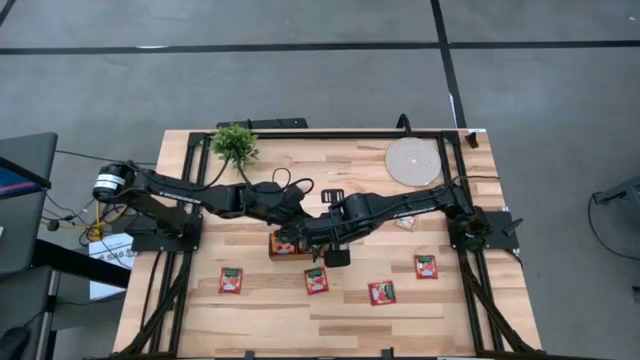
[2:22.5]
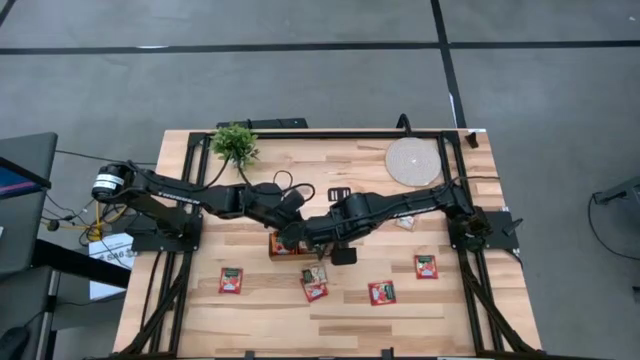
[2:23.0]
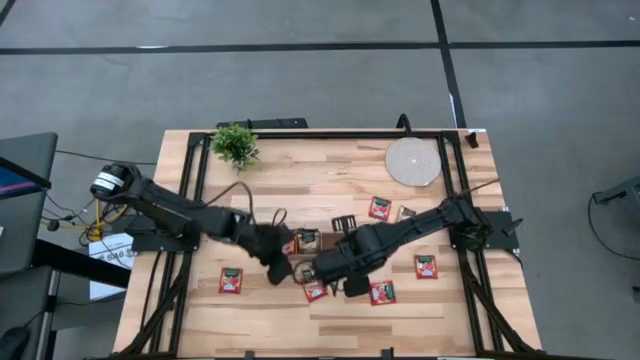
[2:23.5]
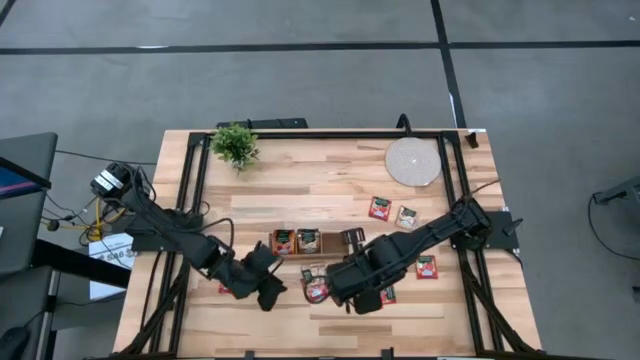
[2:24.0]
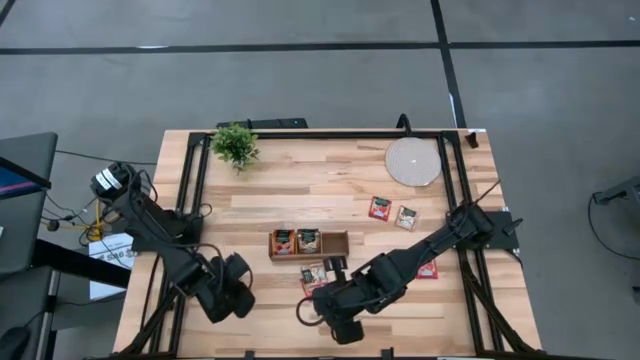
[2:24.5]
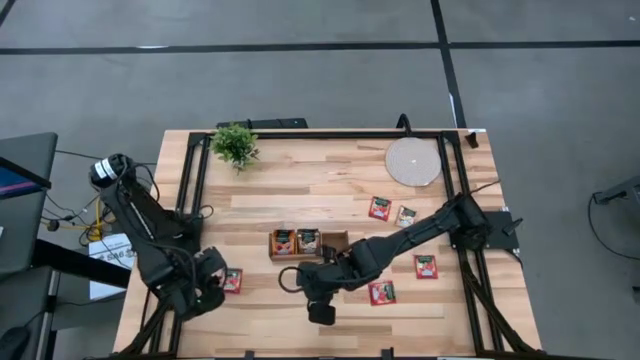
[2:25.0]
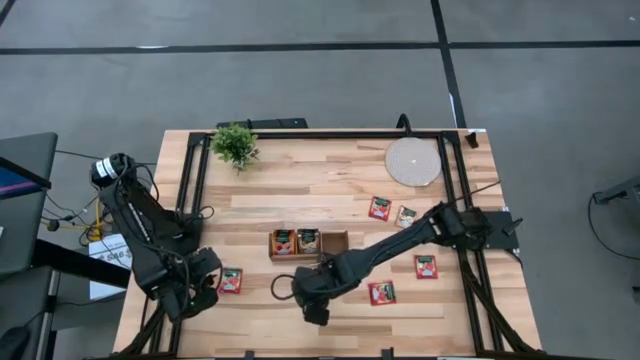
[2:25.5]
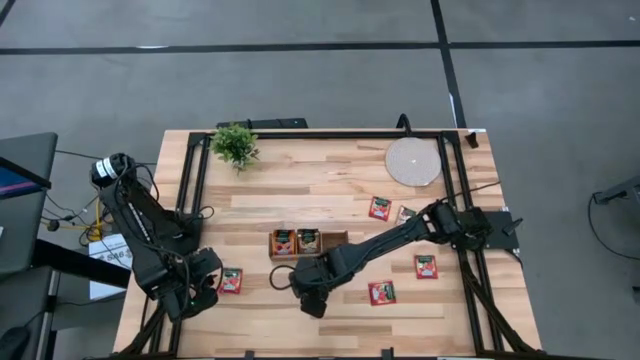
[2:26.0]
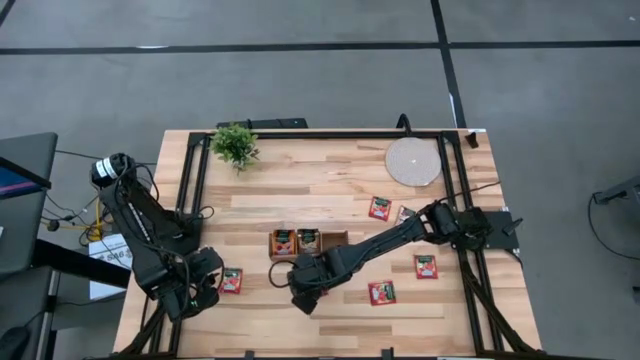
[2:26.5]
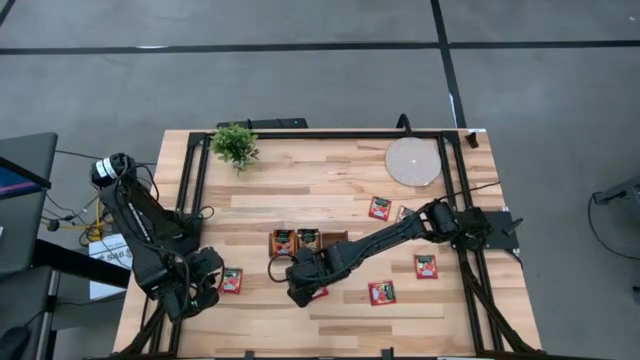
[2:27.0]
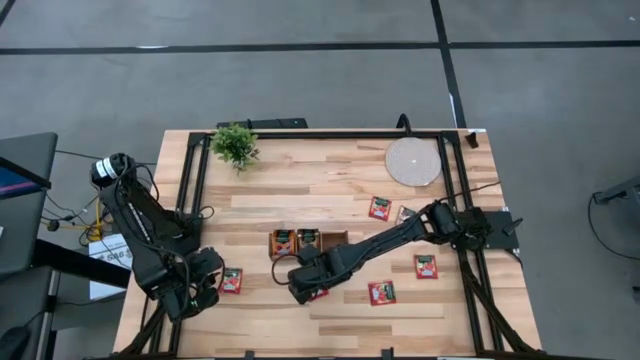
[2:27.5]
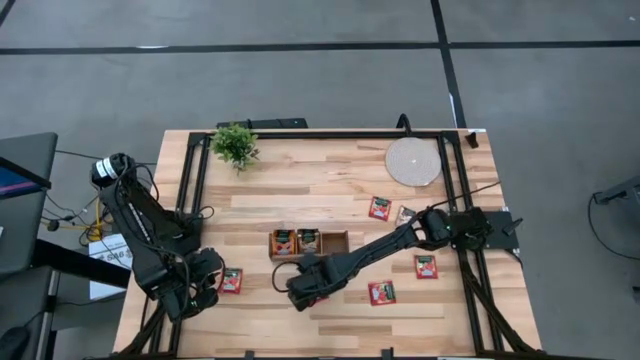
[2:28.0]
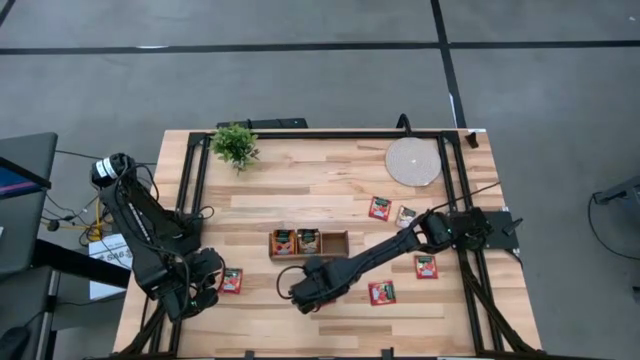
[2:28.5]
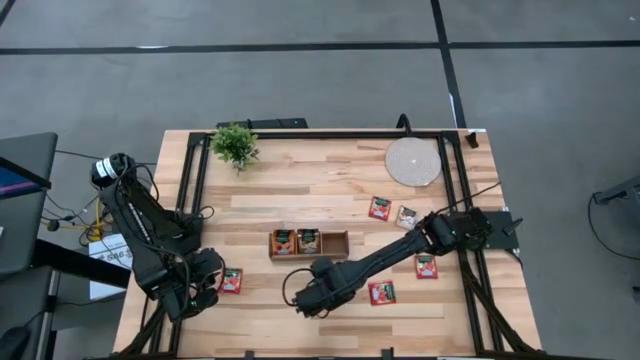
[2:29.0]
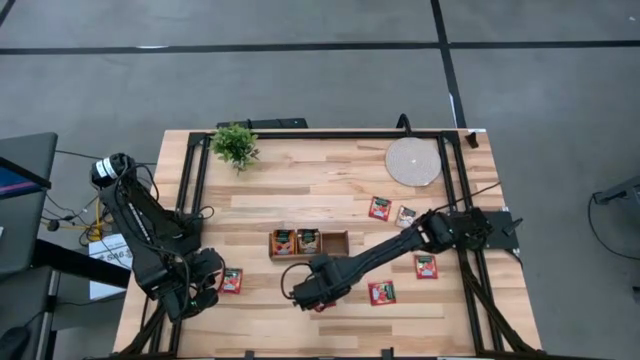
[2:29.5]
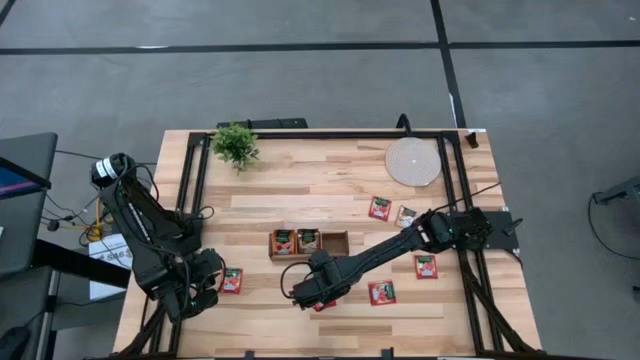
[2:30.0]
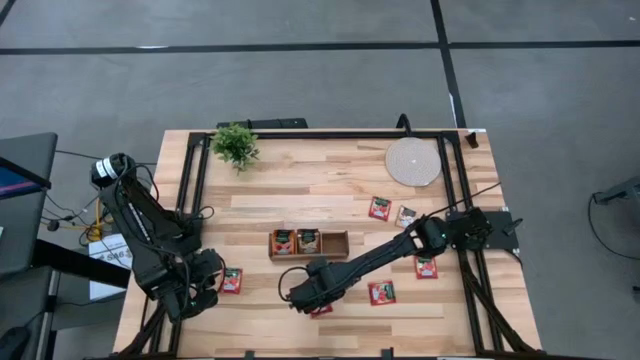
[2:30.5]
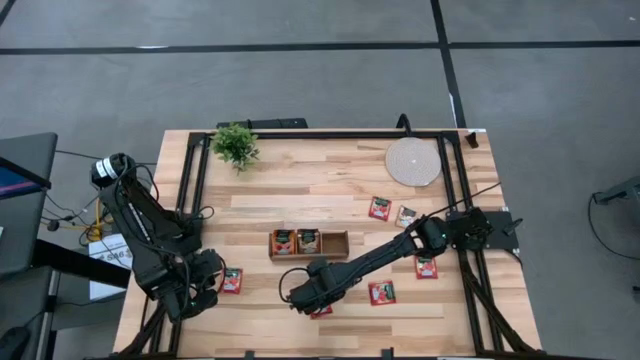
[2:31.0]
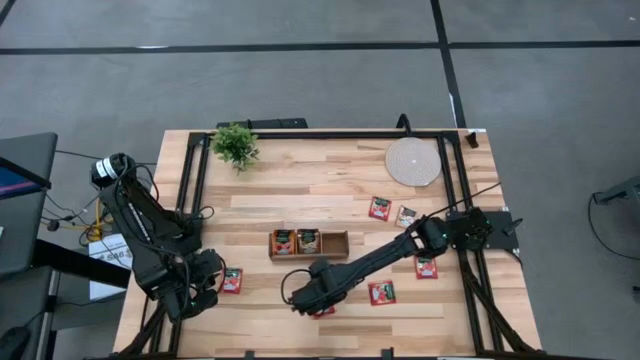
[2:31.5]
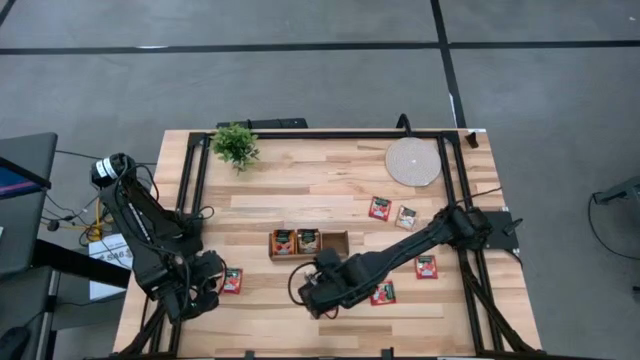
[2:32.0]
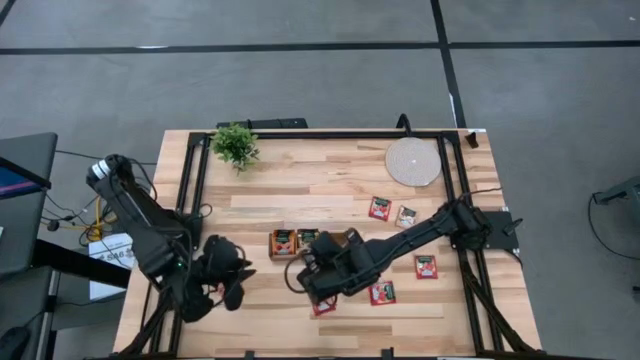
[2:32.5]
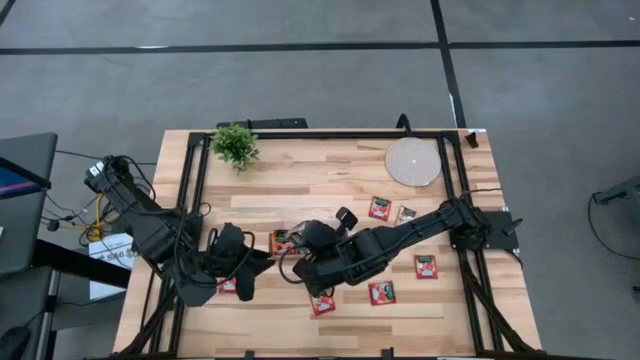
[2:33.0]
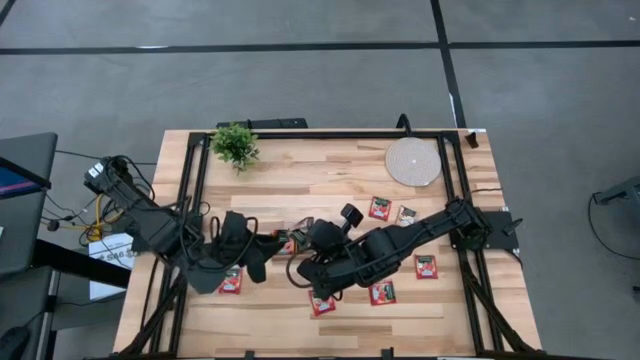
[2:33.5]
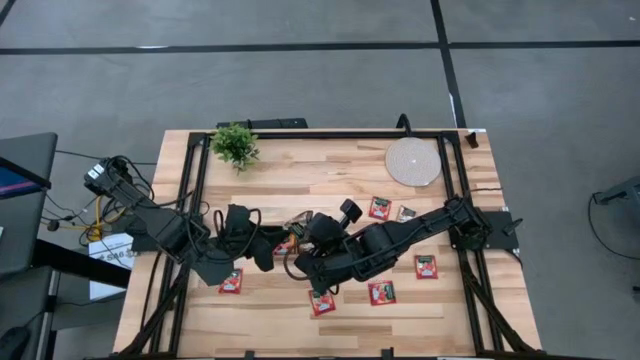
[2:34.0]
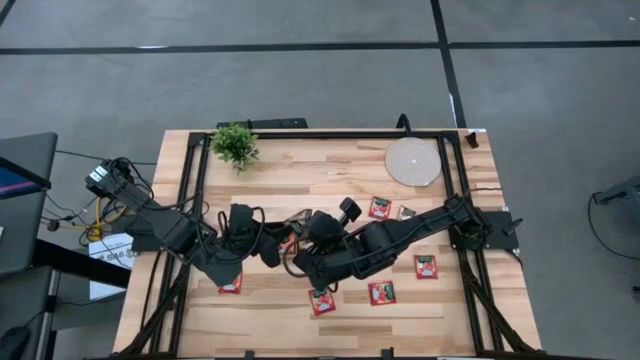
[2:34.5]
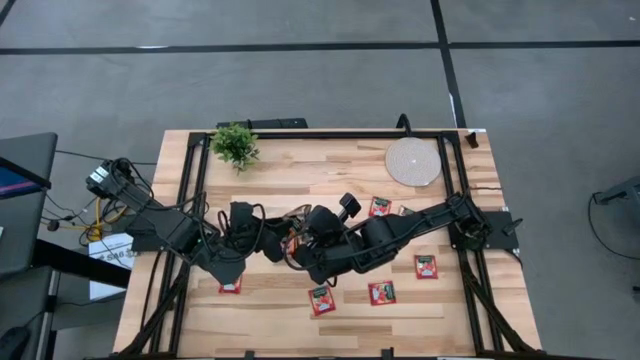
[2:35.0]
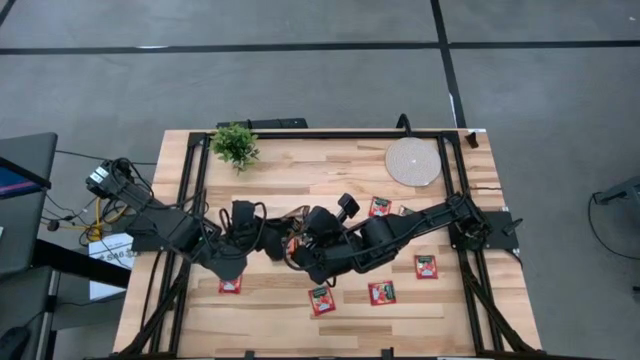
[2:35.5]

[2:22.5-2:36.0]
Task: Pick & Place Tea
Put the brown tea bag into the middle section of the wooden organizer

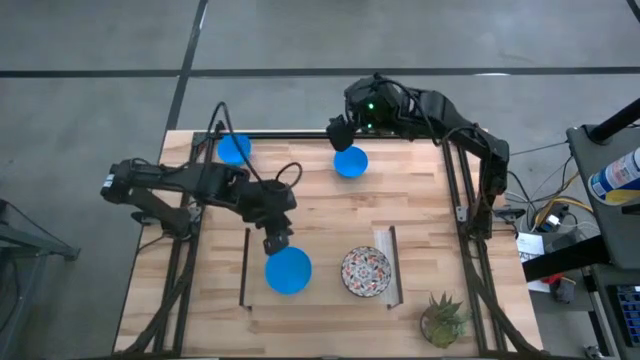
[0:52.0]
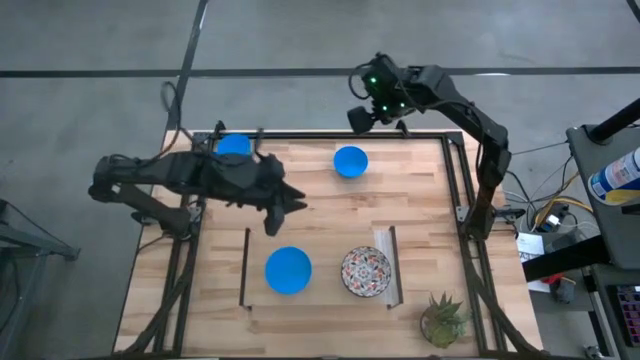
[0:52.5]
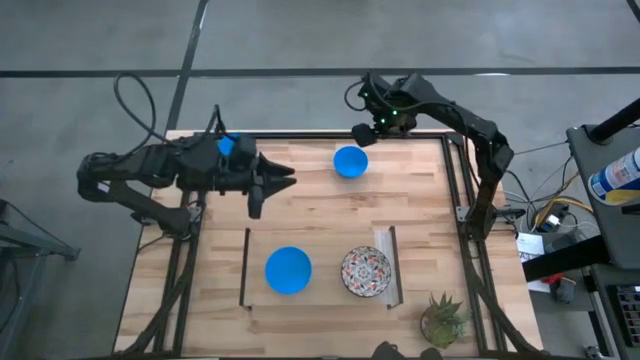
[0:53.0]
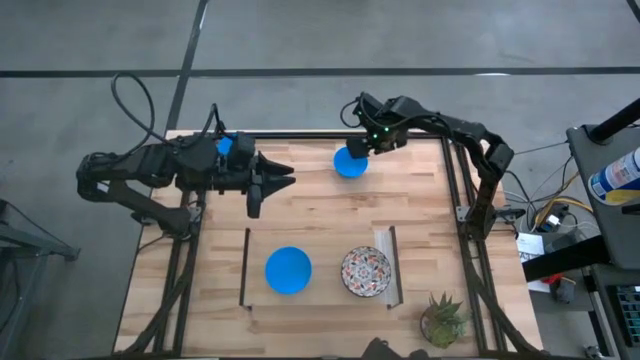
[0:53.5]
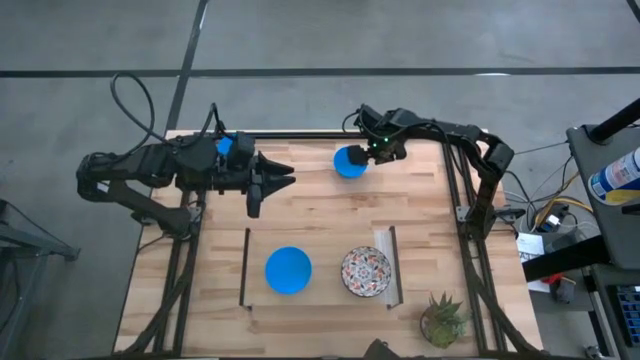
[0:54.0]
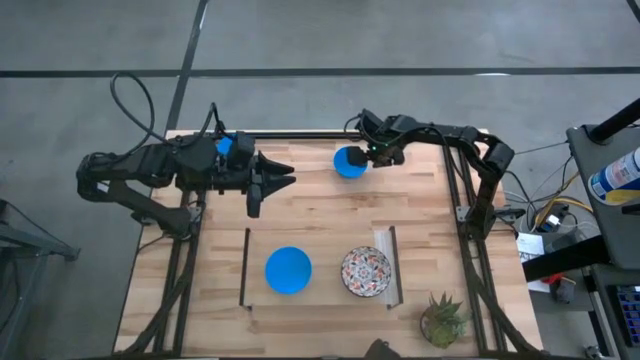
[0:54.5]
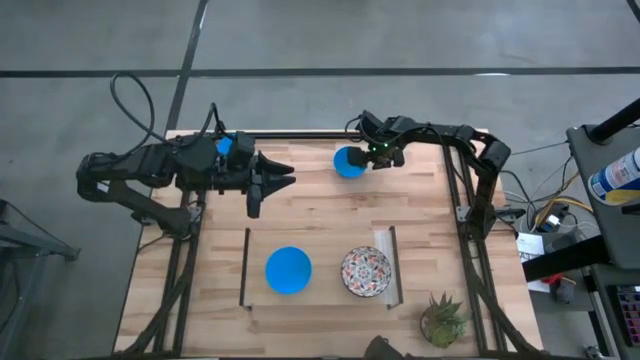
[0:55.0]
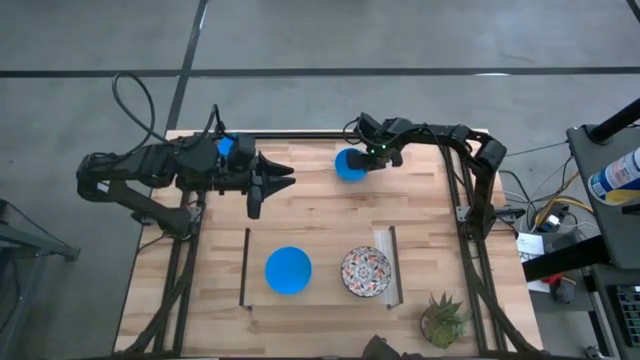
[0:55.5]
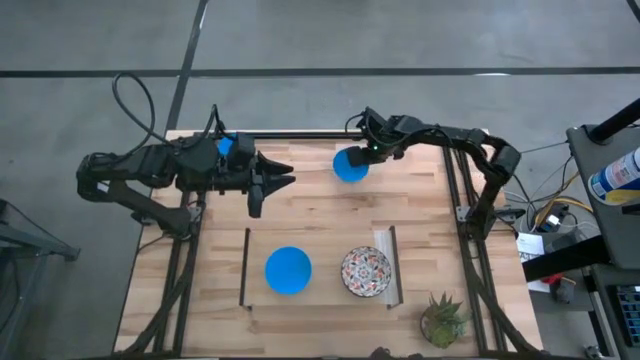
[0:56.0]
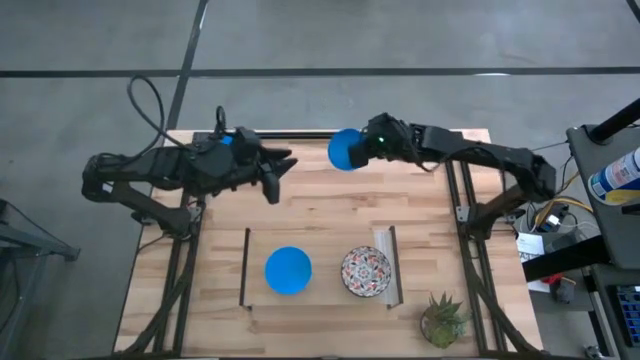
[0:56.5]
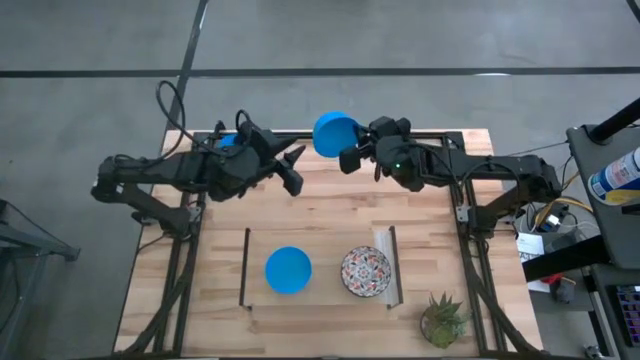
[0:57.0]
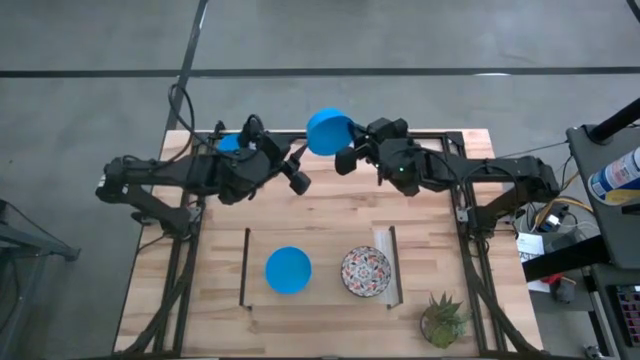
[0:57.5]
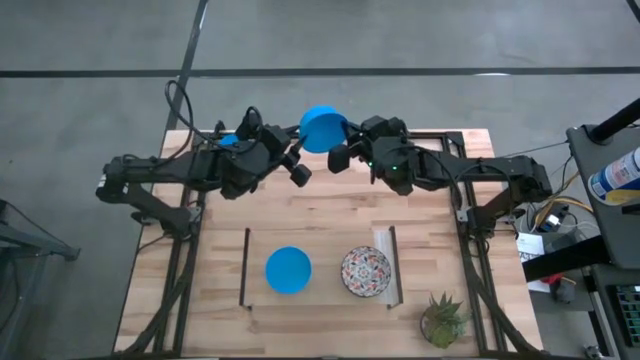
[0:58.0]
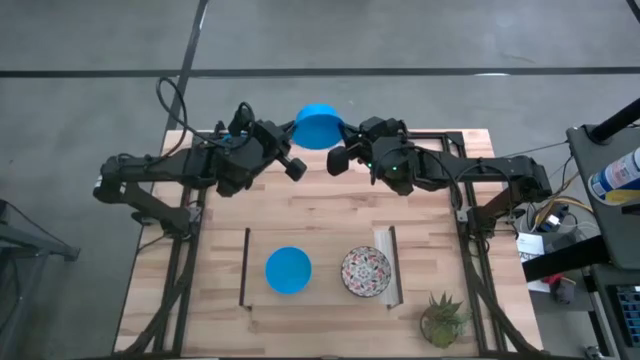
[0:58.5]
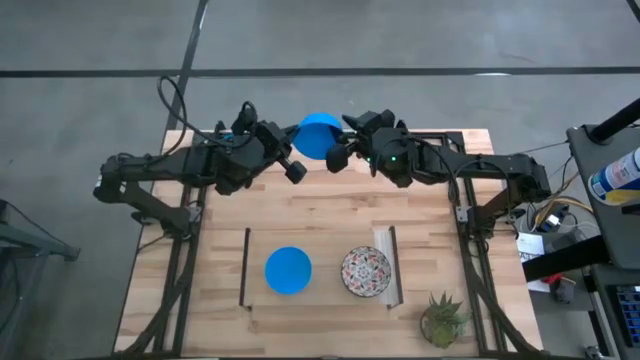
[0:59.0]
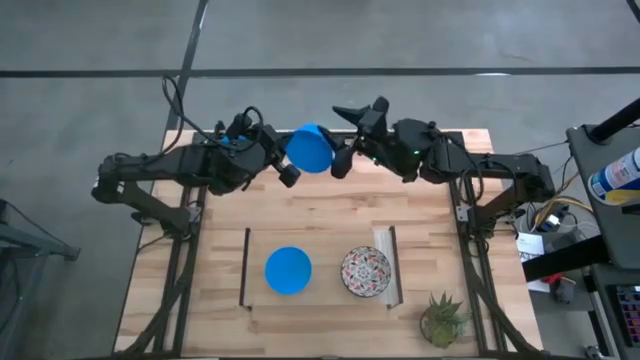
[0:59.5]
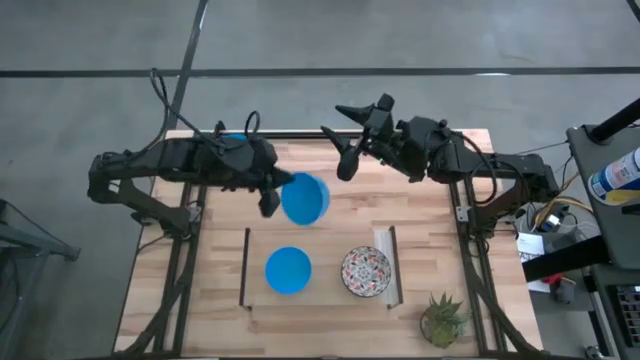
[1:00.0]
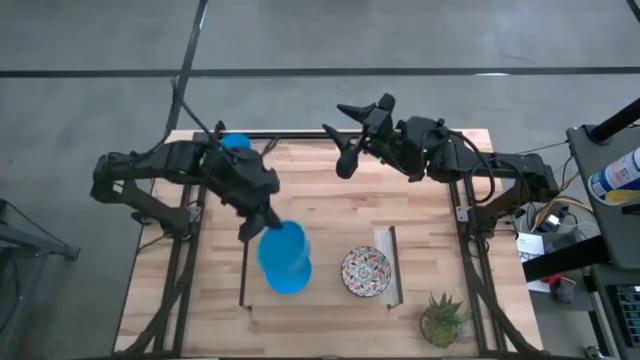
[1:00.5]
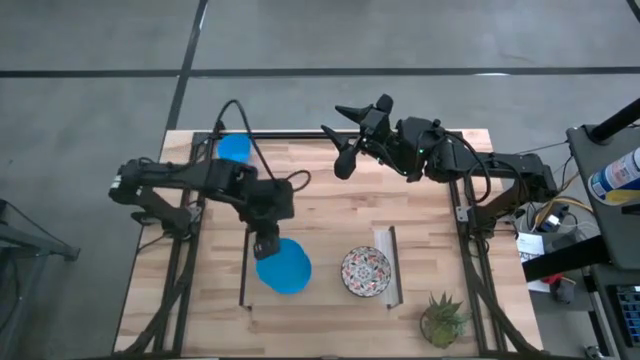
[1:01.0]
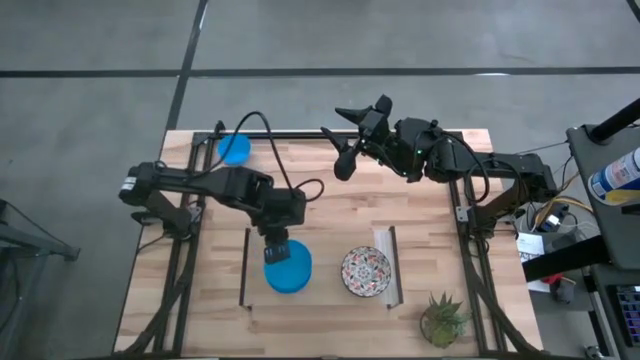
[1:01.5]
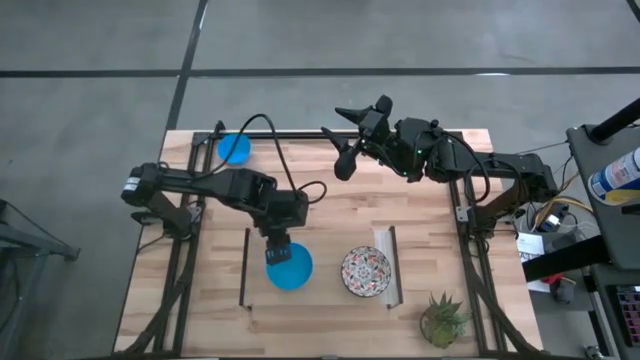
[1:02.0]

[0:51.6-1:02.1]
Task: Pick & Place Mini bowls
Stack the right blue bowl on top of the other blue bowl on the shelf
